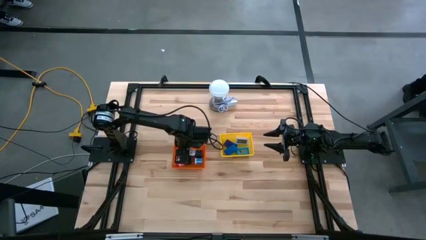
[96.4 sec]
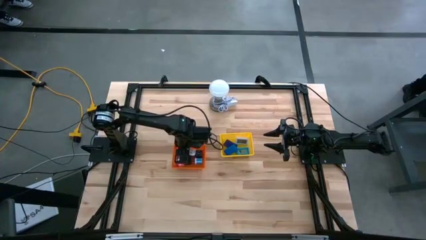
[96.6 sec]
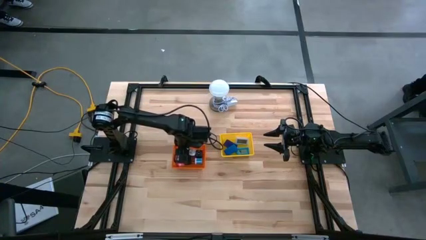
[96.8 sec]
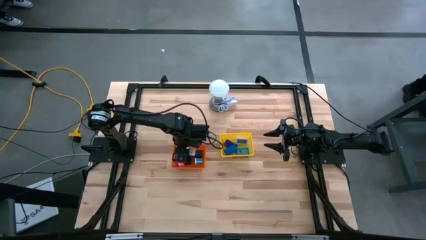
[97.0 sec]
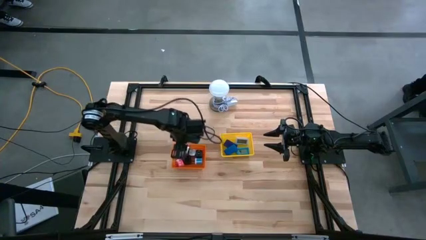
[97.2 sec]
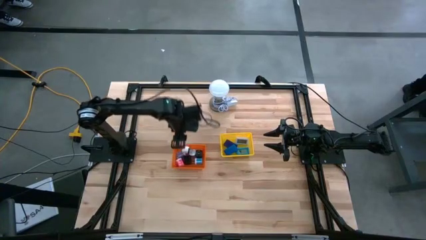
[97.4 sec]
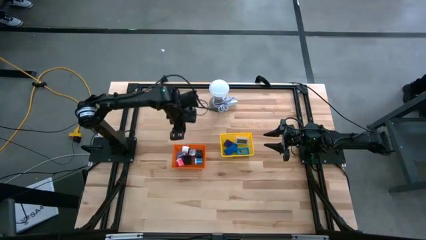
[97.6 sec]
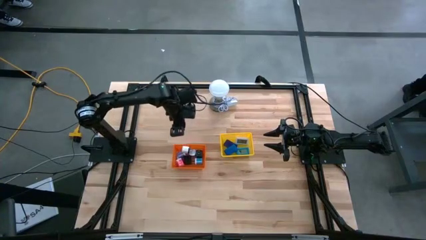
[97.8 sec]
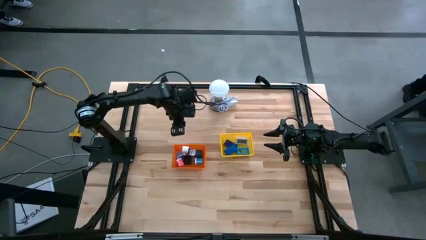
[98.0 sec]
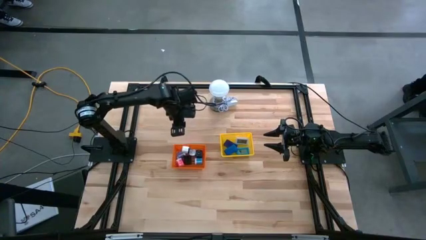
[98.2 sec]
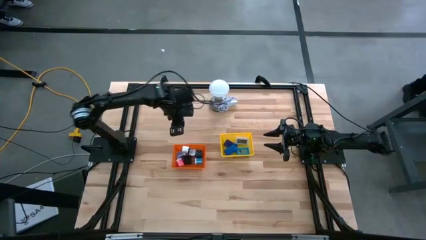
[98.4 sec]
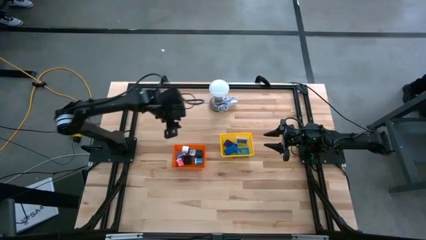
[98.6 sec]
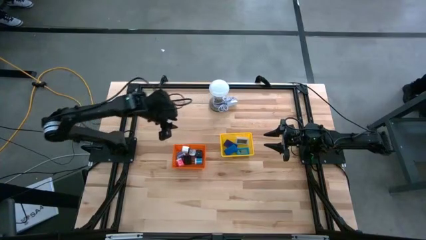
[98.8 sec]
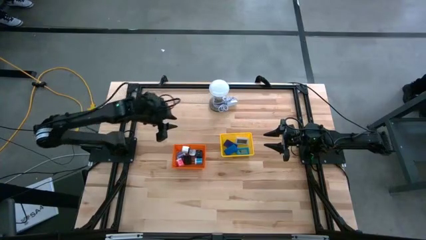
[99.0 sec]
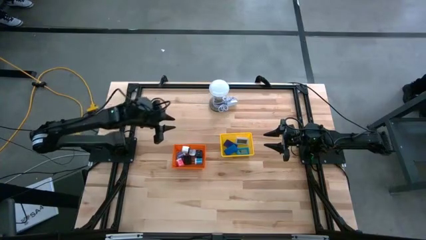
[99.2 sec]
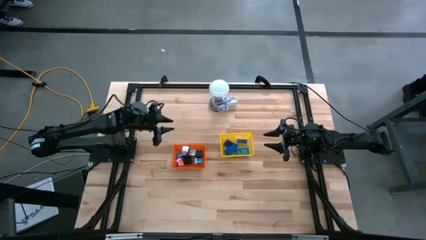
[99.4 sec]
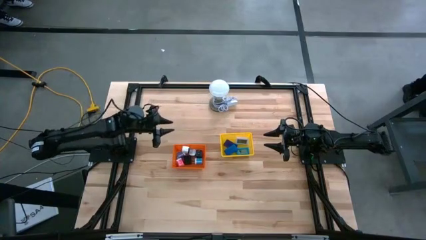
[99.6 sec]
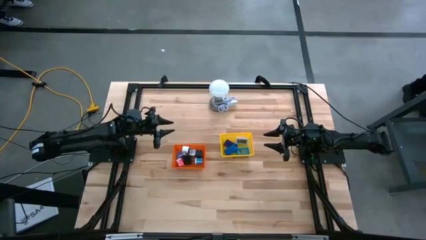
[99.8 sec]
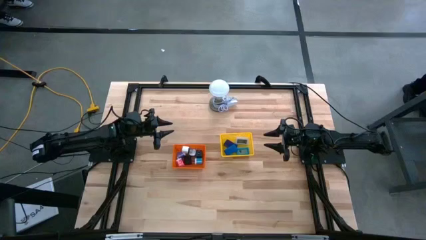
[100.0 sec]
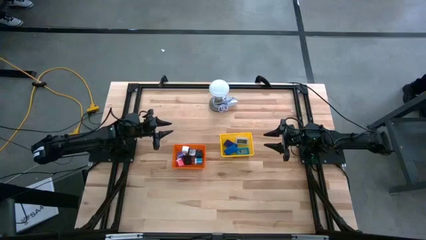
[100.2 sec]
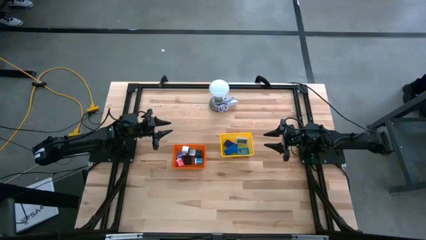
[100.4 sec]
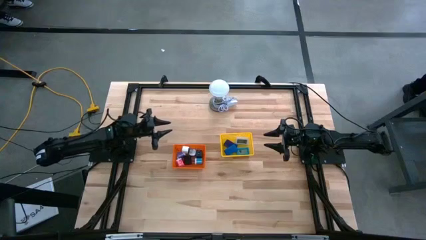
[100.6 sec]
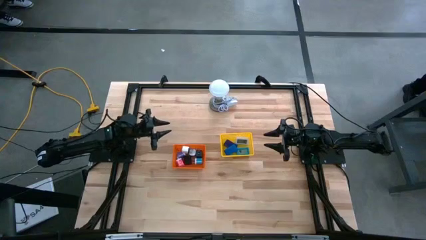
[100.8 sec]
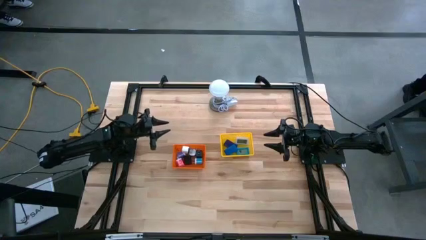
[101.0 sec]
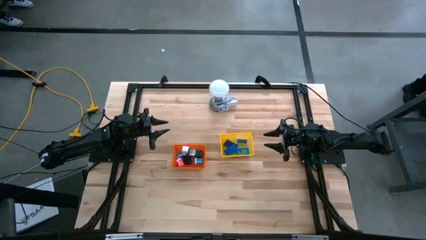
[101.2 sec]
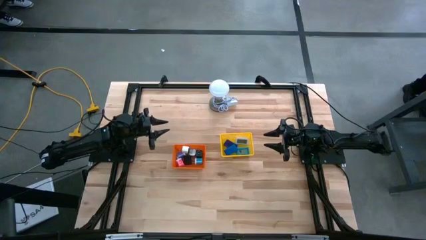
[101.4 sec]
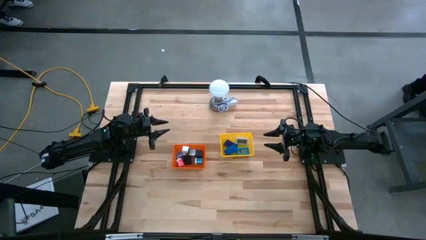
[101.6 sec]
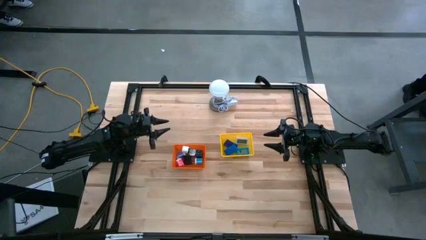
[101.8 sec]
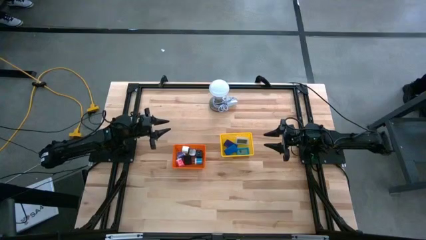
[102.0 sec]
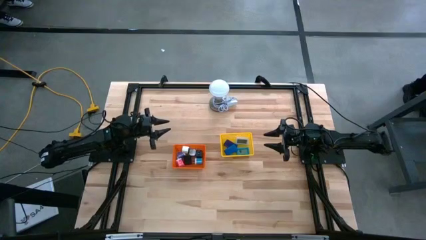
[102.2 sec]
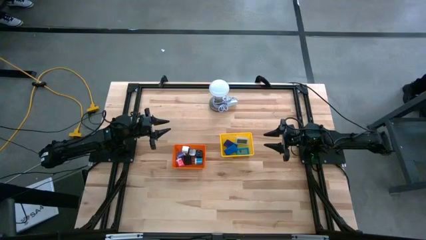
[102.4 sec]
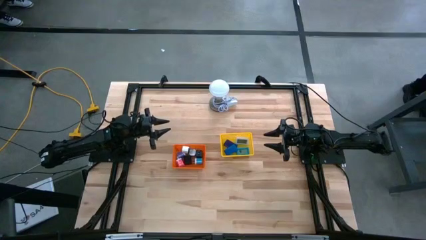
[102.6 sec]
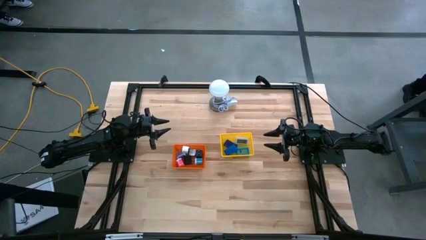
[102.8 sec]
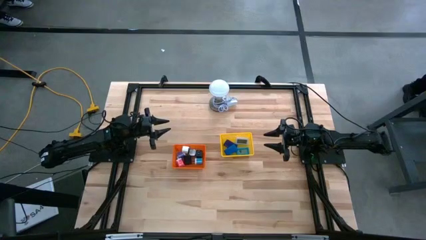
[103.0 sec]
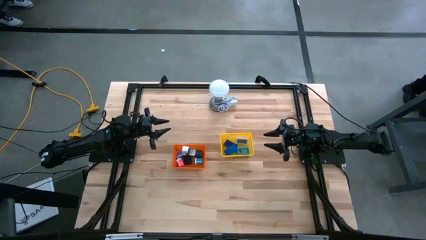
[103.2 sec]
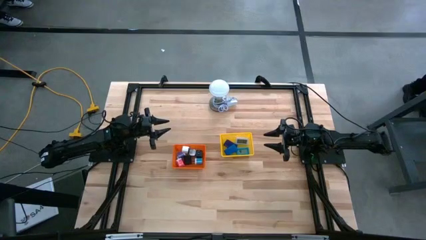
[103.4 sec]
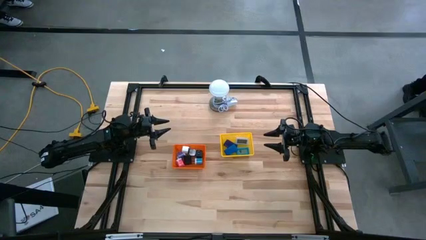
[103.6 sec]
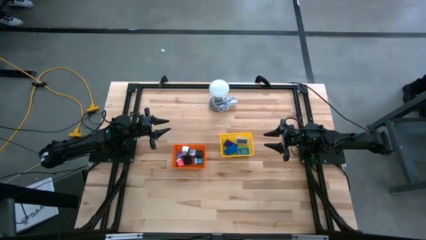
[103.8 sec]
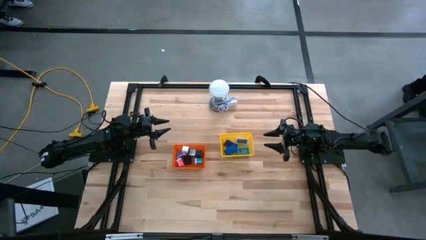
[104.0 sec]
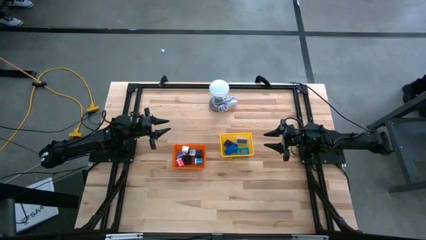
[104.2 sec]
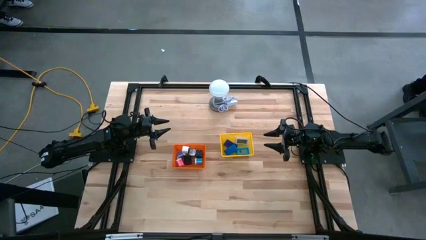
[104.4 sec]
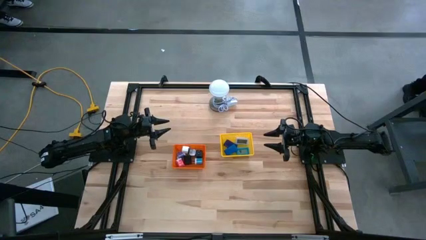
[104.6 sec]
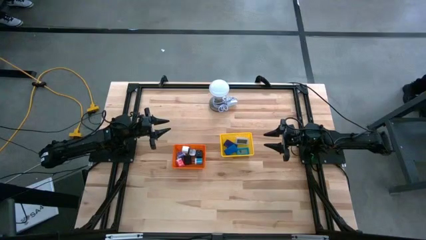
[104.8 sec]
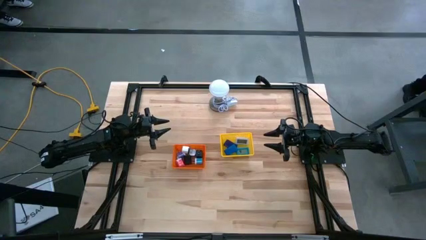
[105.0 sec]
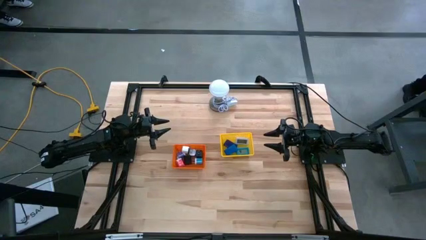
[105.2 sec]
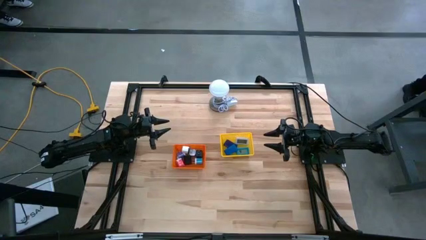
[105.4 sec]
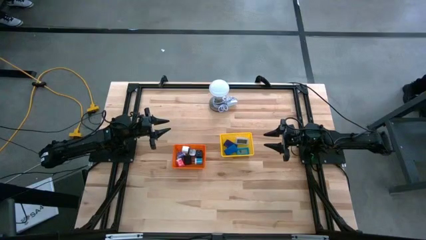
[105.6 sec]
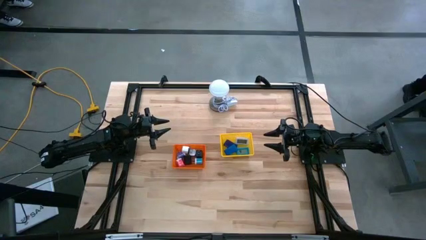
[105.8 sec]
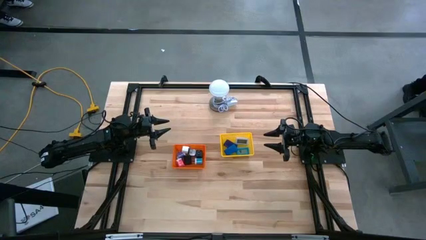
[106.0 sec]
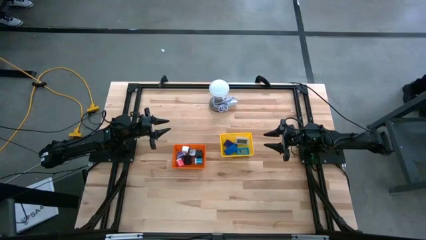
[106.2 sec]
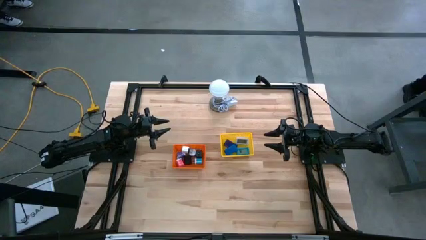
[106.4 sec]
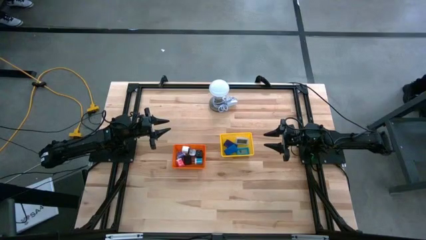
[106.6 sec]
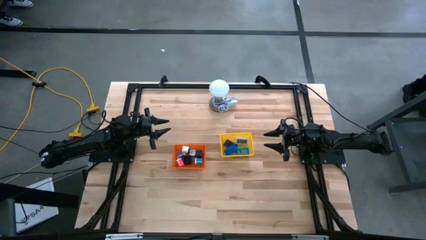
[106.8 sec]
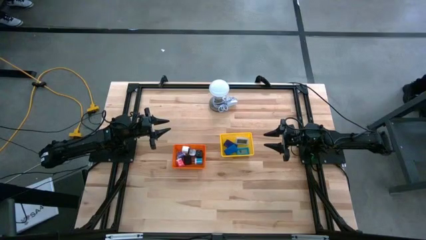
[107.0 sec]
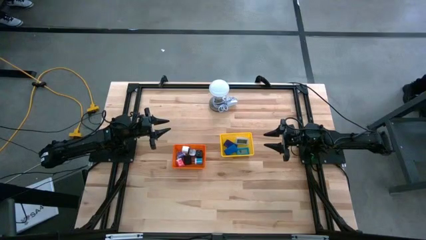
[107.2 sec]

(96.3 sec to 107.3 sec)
Task: Pick & Place Office items
Return to Home Position

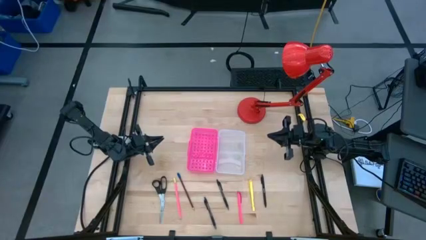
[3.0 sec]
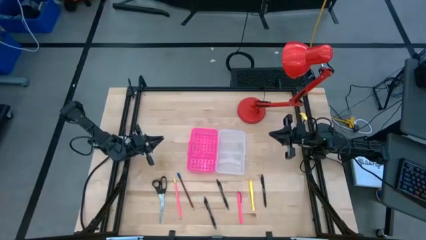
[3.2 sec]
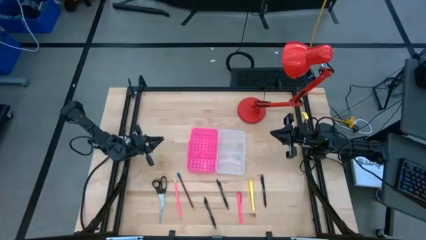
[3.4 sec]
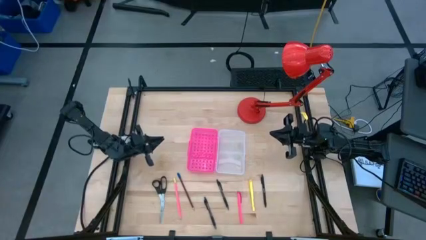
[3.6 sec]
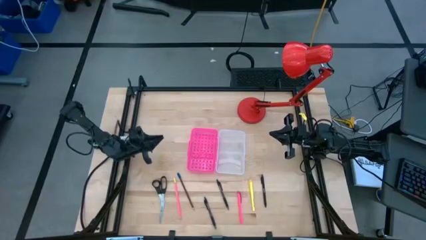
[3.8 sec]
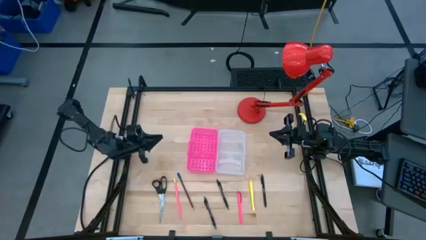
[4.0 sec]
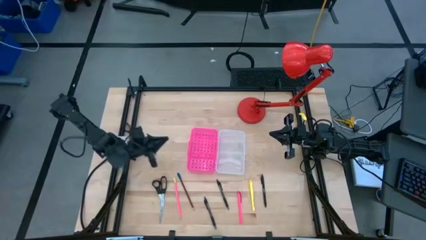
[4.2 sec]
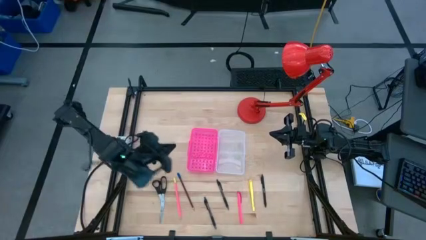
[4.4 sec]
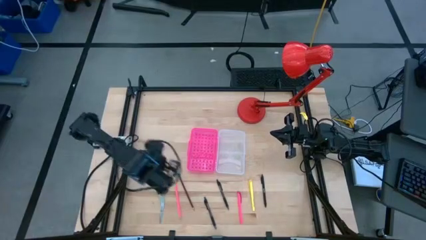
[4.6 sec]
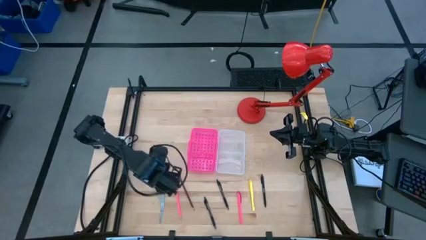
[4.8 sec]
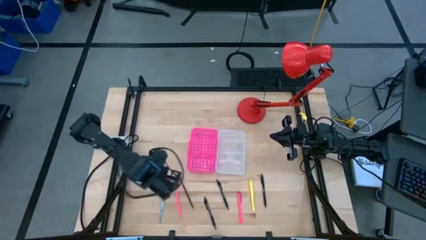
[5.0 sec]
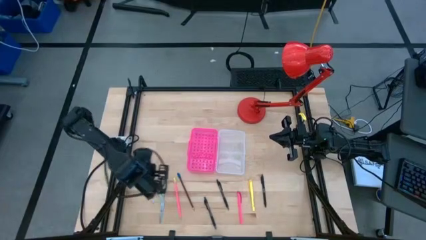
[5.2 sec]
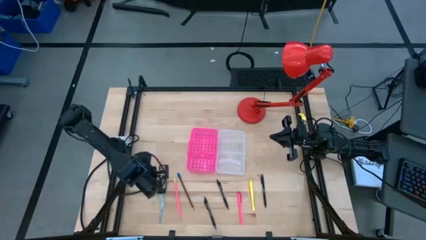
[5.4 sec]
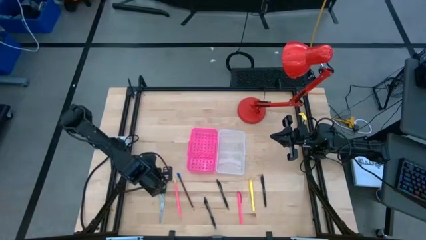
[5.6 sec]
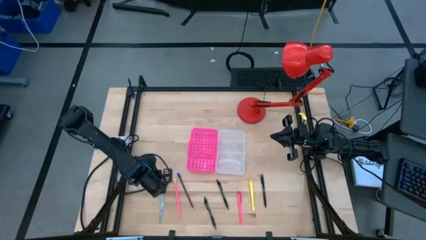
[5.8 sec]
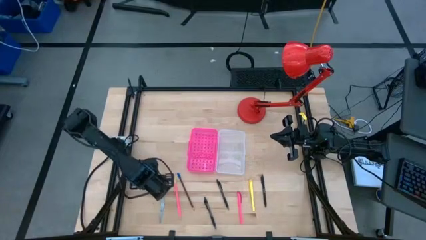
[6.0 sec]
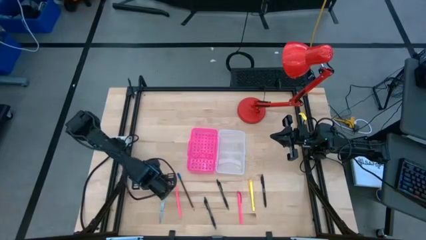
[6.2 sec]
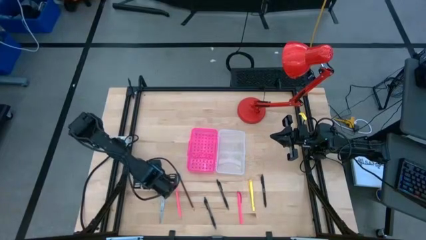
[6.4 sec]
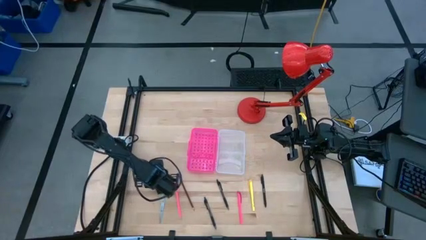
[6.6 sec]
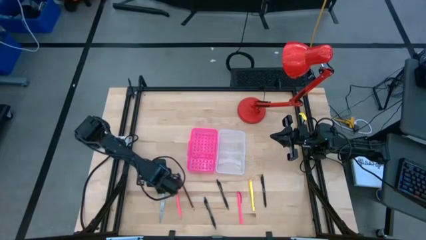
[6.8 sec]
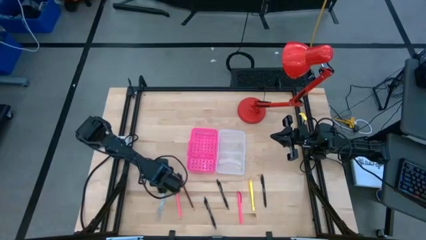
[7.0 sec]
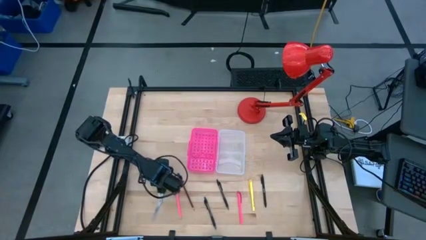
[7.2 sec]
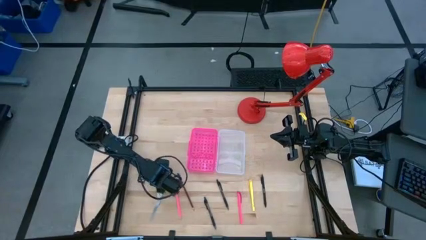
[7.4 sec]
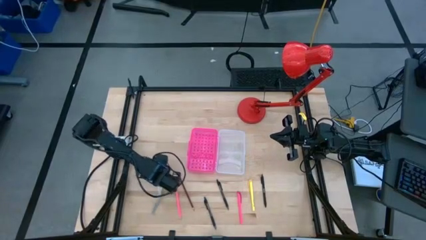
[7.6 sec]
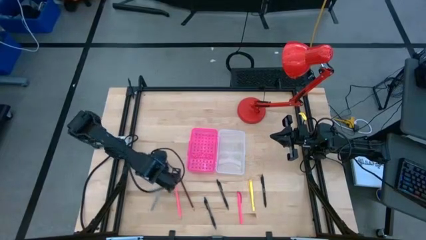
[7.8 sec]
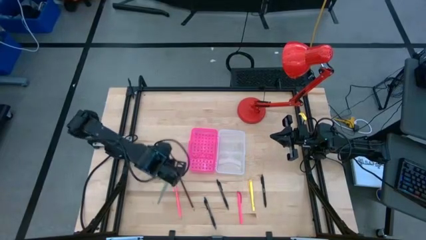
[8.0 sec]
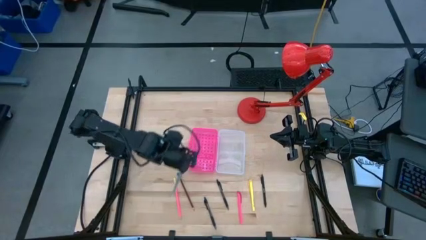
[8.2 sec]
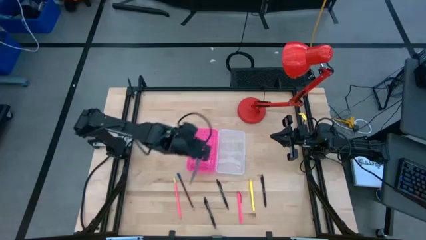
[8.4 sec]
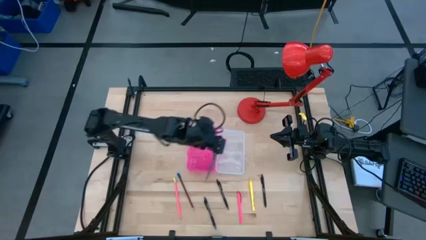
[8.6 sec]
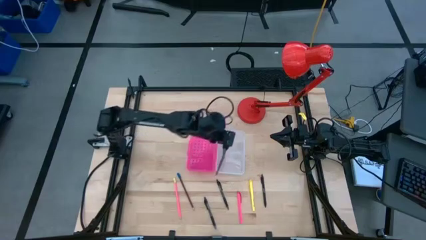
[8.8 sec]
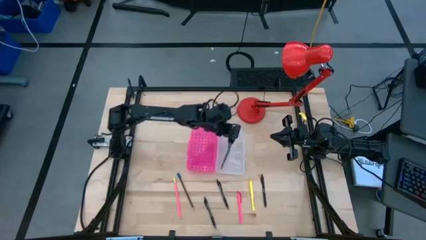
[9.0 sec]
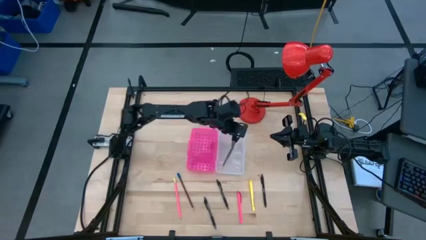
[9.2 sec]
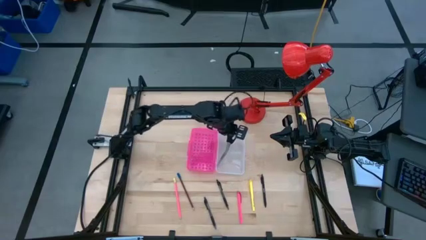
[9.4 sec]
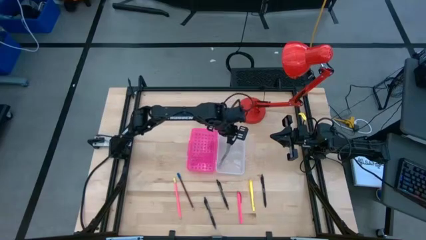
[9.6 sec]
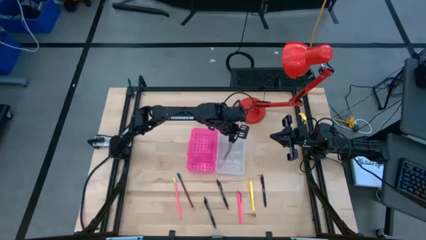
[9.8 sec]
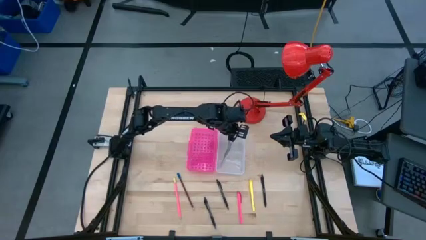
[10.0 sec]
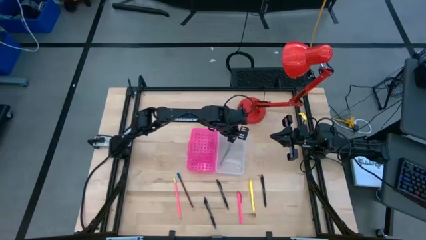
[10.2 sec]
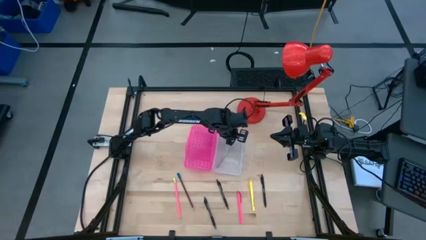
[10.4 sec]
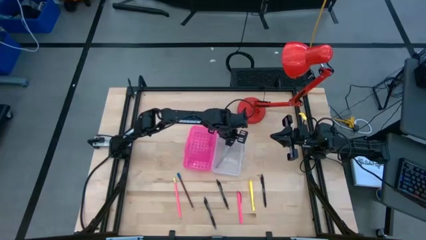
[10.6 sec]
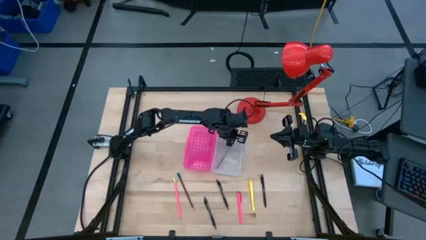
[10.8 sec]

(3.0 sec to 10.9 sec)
Task: Pick & place school supplies into a supply box
Put the black scissors into the pink supply box
